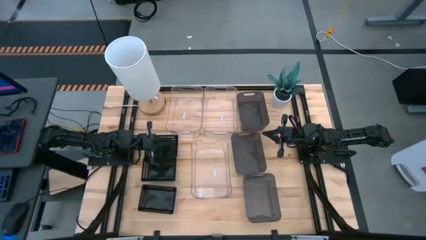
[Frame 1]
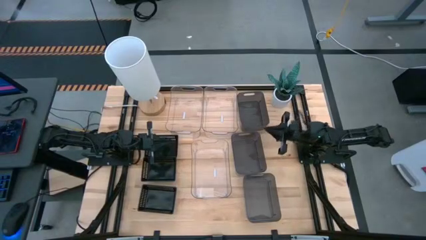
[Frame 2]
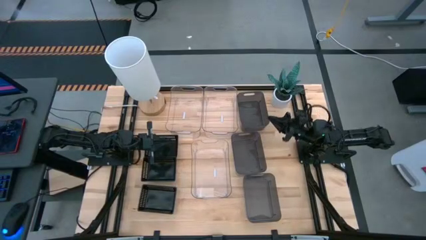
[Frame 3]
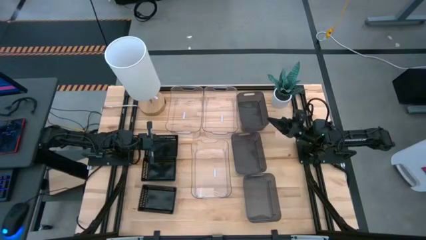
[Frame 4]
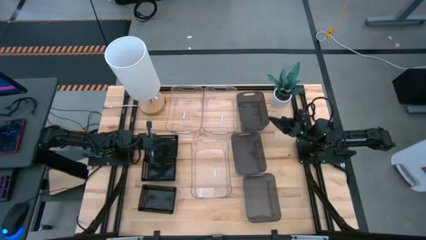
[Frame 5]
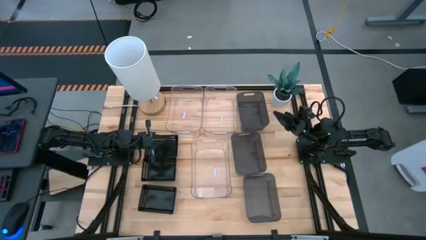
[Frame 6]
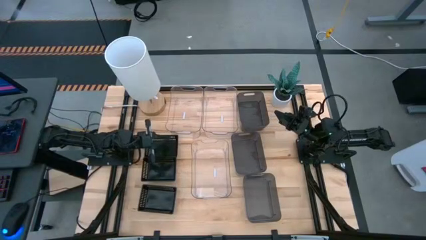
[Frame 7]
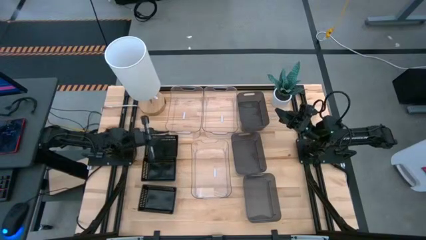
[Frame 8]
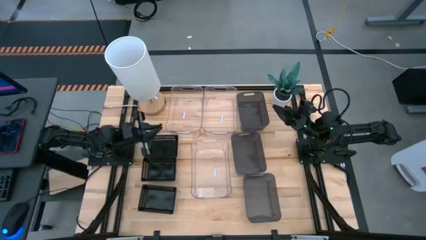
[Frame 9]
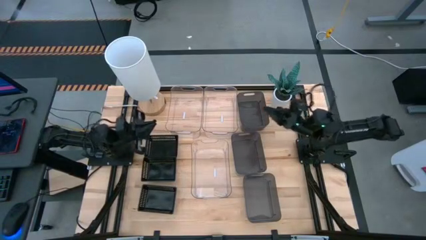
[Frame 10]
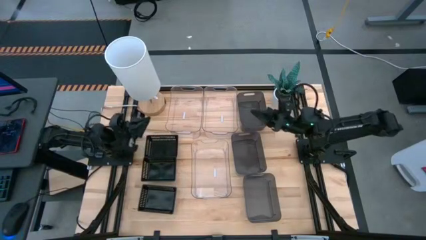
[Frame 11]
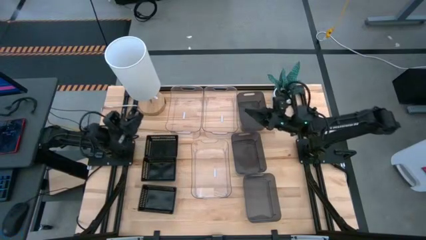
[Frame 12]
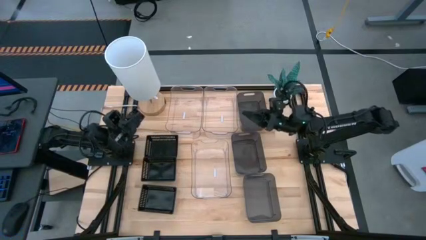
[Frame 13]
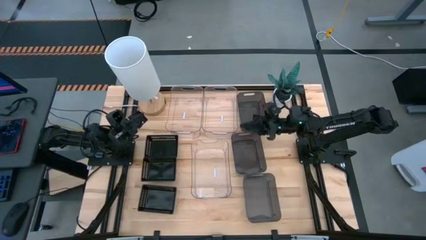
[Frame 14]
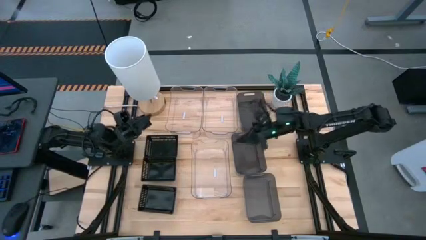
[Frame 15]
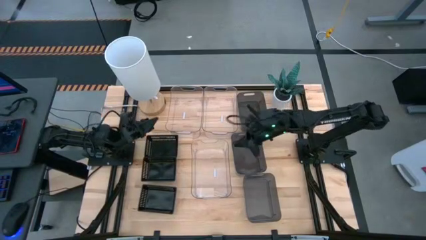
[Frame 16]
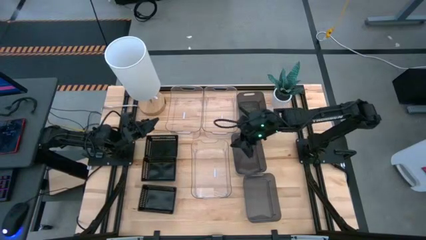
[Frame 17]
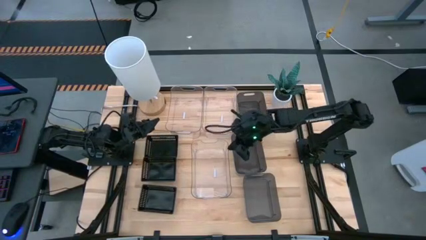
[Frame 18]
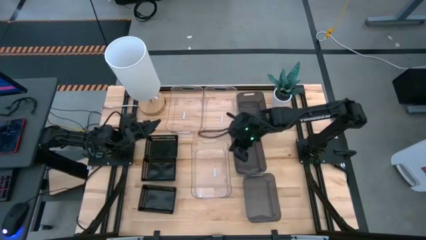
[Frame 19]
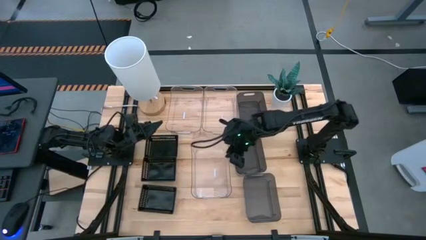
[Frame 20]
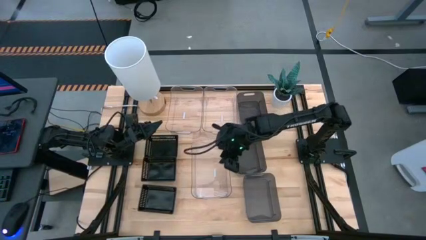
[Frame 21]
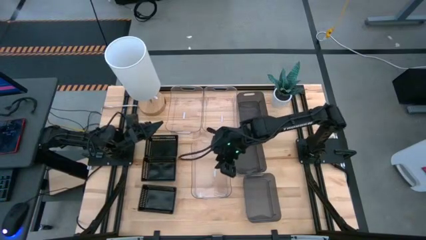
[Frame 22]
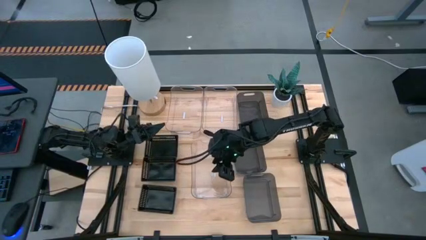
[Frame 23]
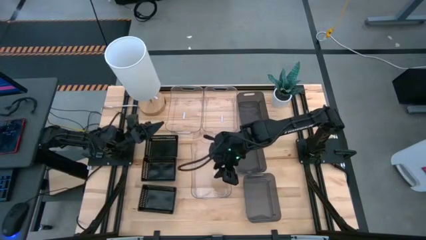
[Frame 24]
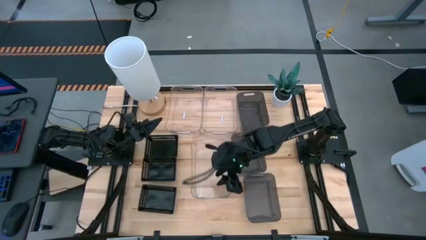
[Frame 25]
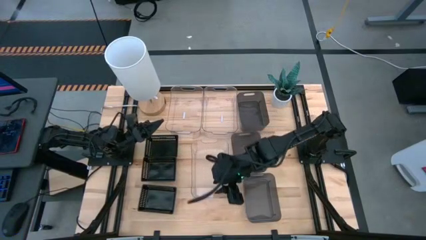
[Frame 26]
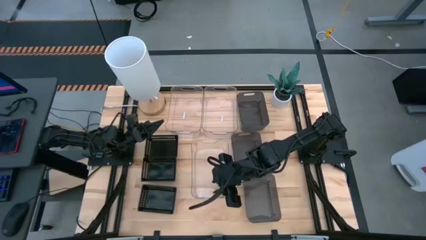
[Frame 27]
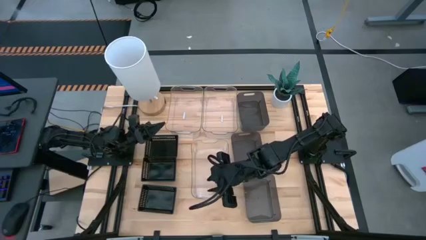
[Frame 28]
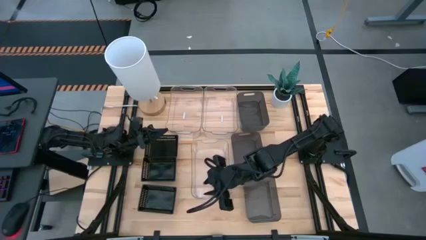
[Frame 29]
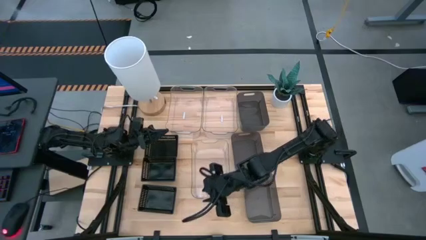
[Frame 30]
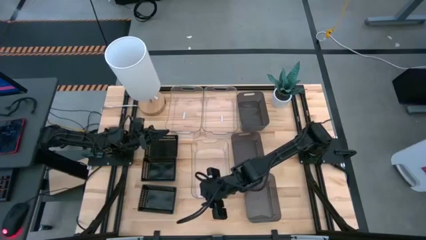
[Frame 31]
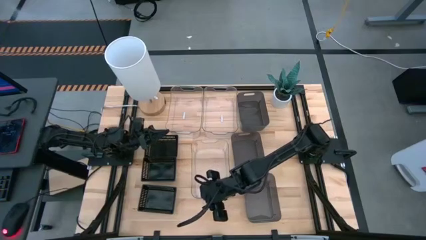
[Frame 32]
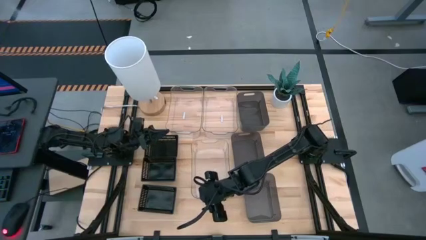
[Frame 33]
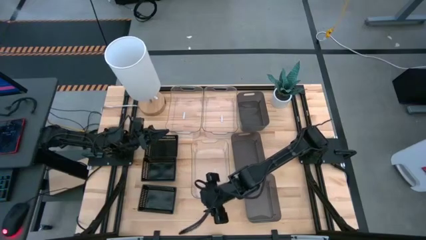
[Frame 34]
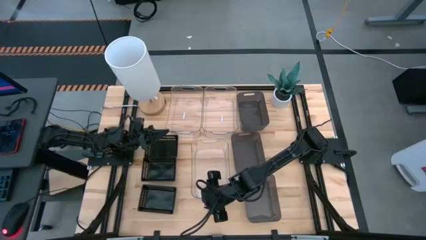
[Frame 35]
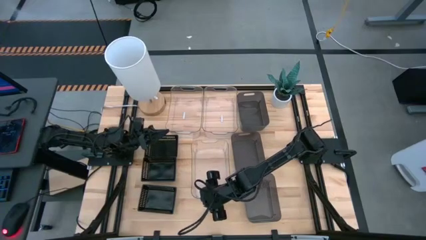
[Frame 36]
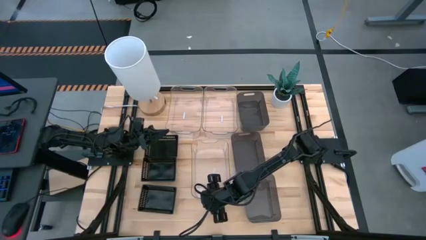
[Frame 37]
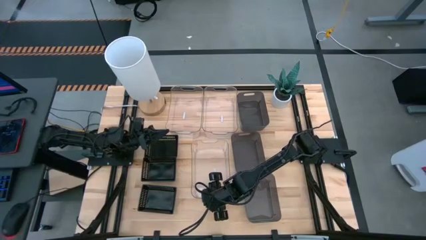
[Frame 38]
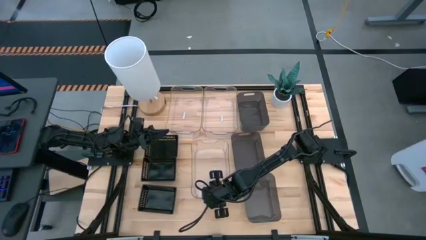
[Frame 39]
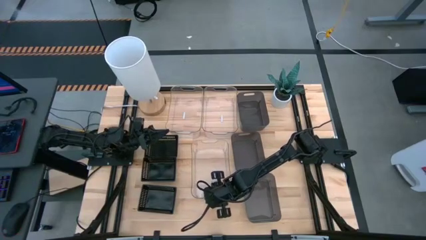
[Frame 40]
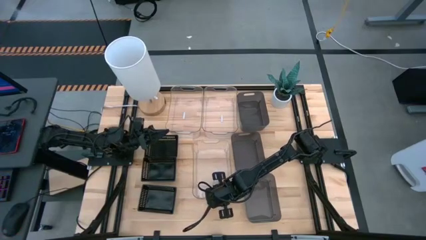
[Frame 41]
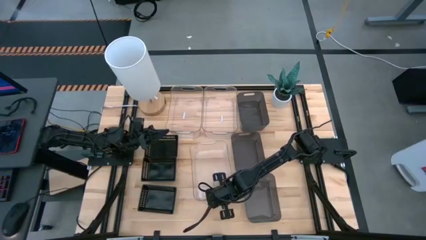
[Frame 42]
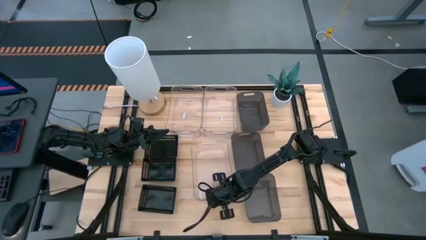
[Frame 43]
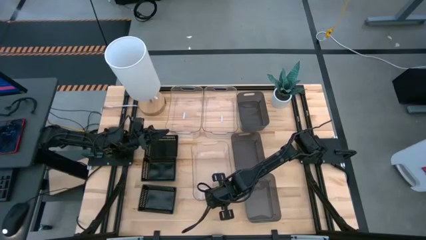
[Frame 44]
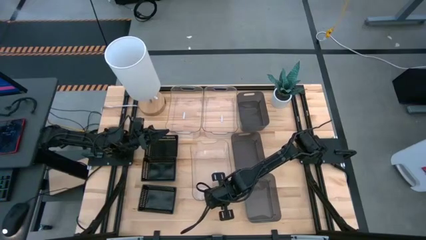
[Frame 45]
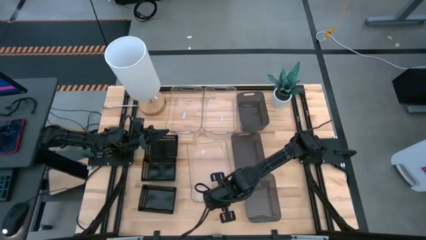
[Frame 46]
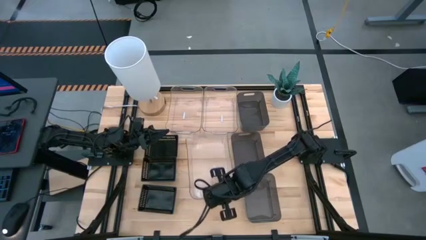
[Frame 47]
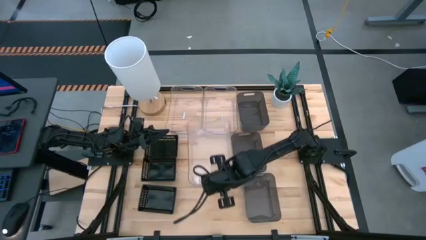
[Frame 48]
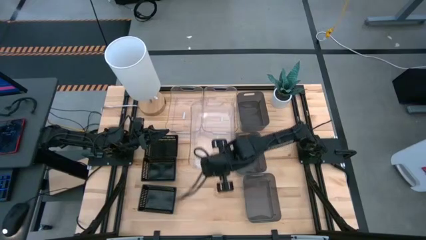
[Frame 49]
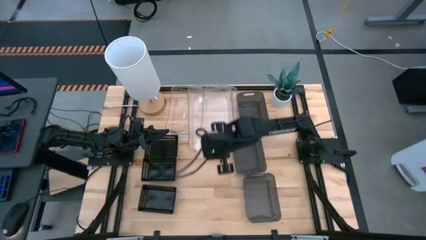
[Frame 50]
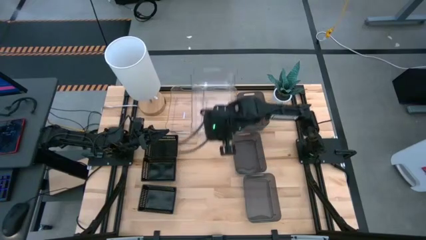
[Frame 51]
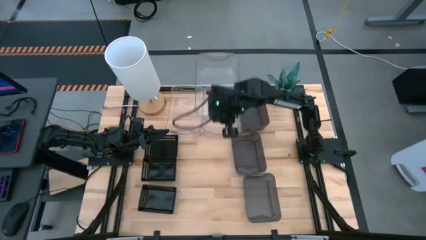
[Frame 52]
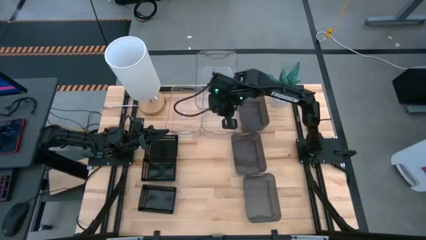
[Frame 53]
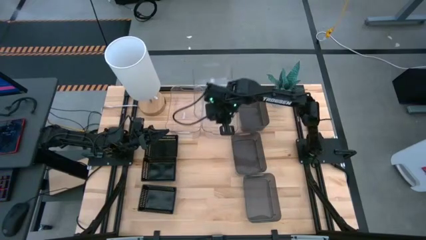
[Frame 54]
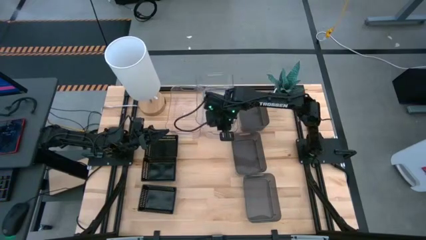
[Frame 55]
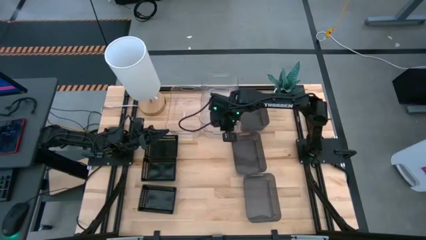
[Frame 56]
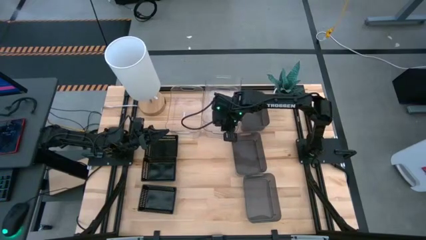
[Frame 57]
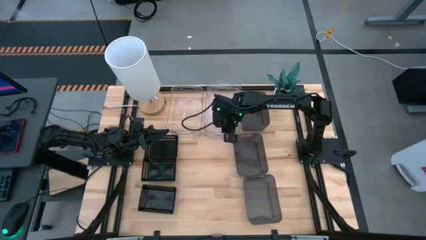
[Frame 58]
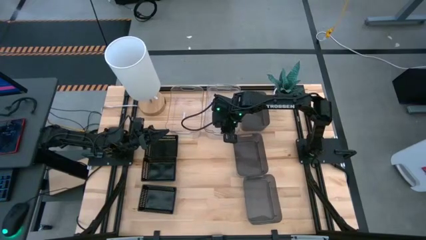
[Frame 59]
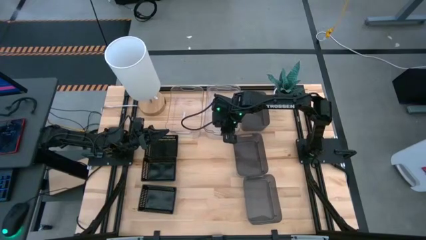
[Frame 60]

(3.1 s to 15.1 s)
Stack the bottom transparent bin on top of the top right transparent bin
